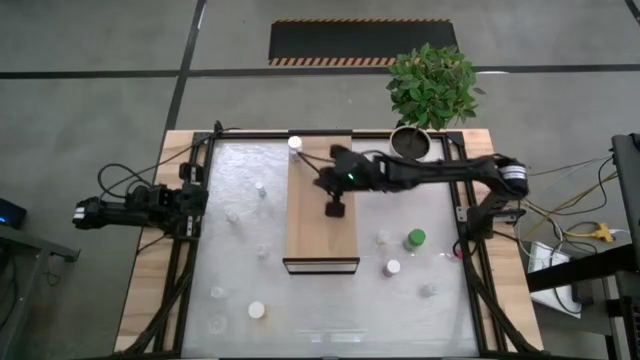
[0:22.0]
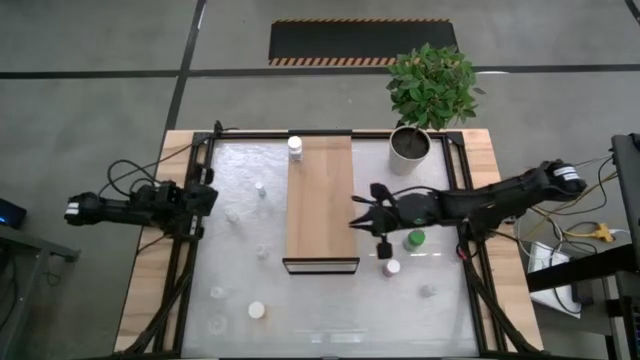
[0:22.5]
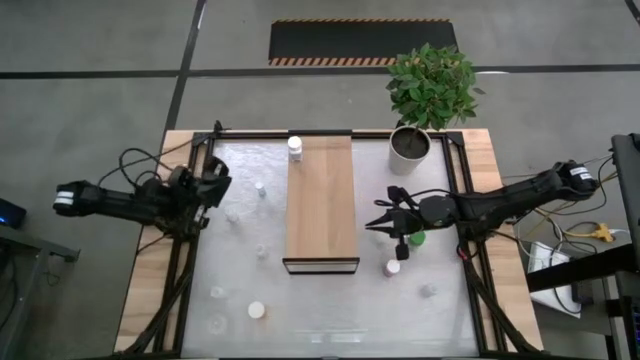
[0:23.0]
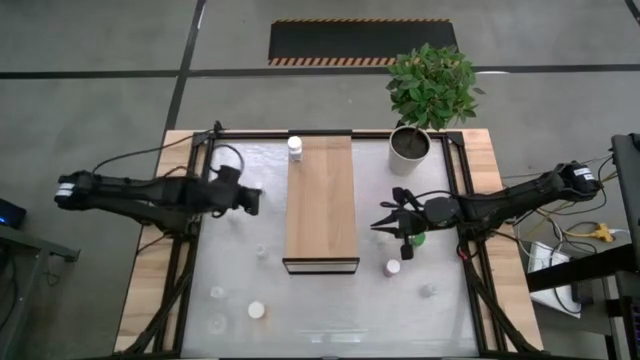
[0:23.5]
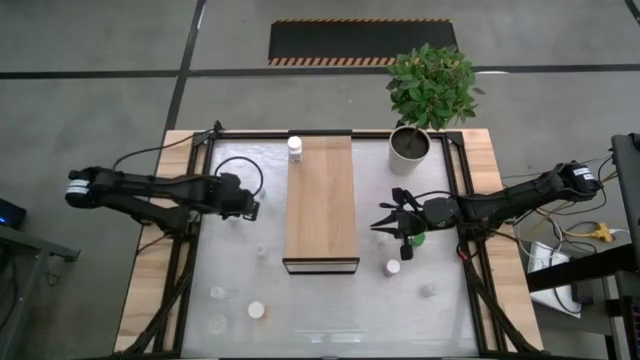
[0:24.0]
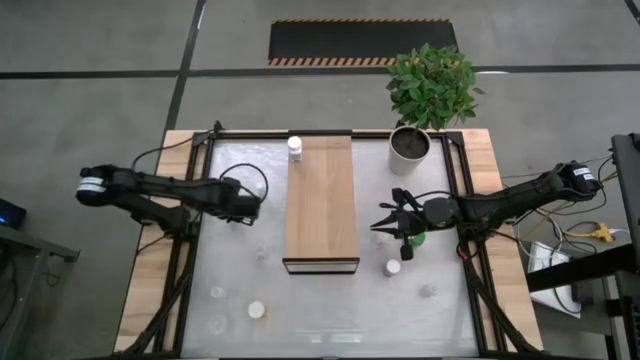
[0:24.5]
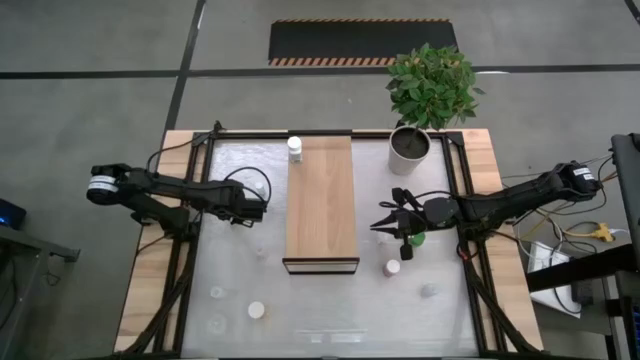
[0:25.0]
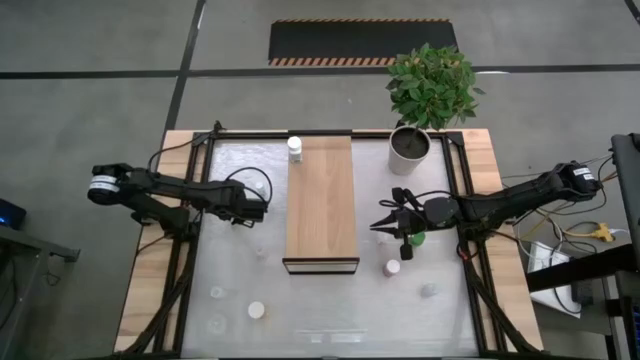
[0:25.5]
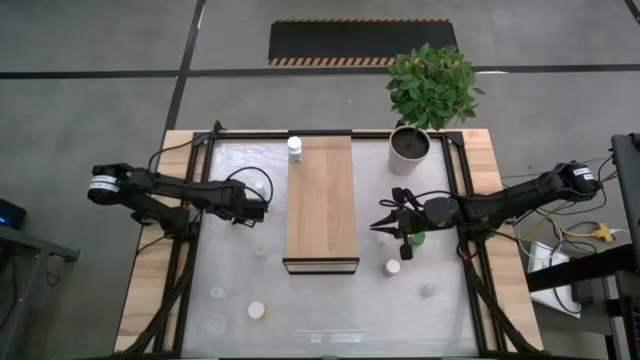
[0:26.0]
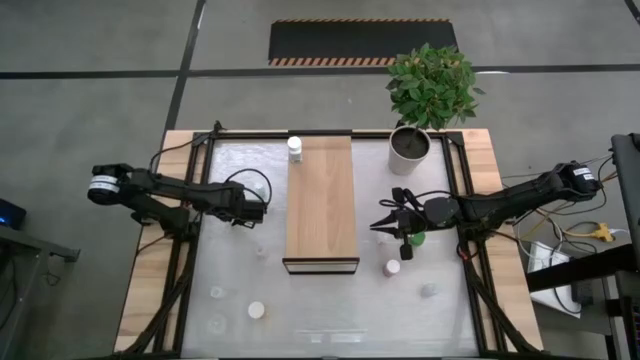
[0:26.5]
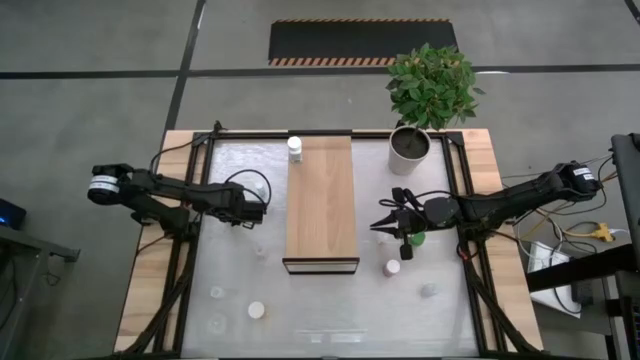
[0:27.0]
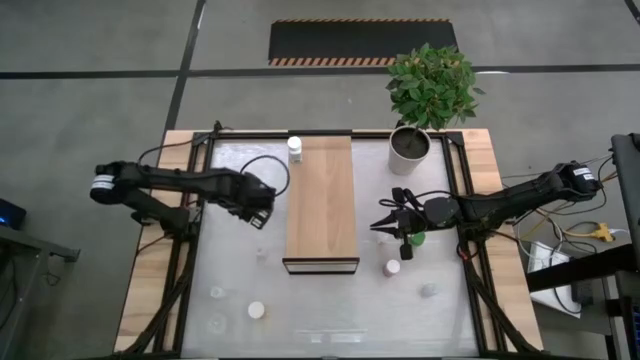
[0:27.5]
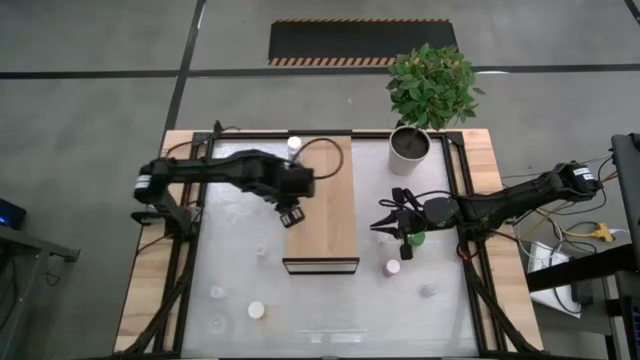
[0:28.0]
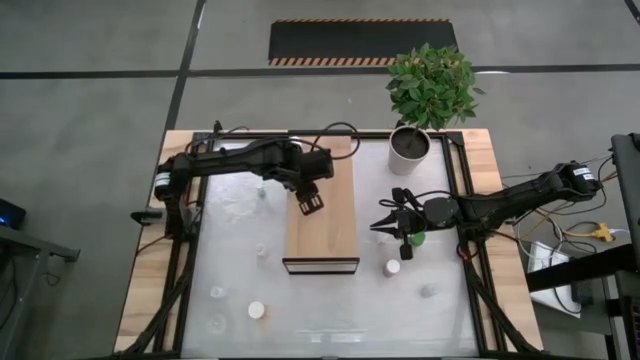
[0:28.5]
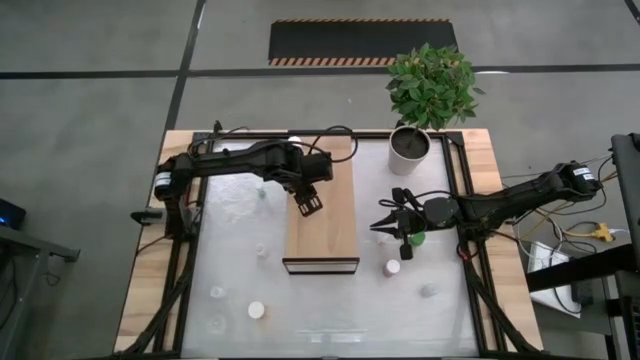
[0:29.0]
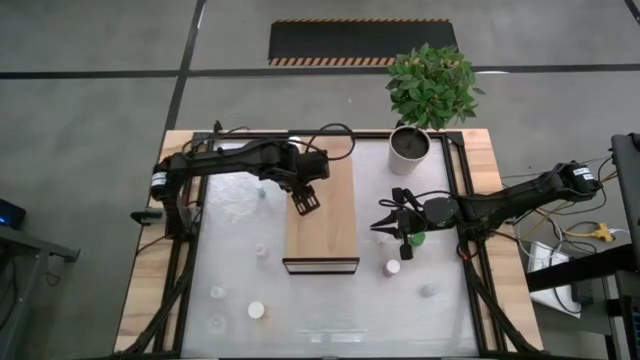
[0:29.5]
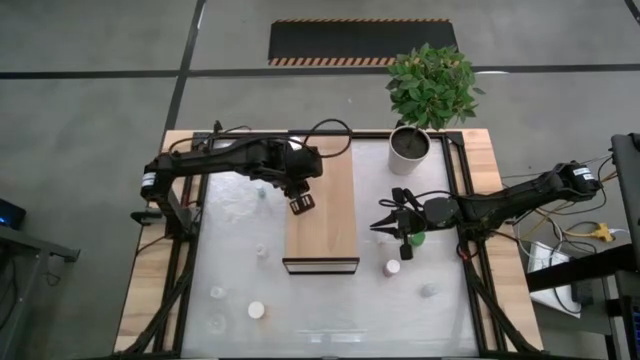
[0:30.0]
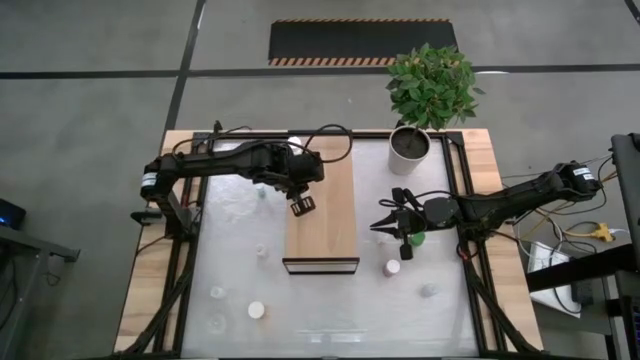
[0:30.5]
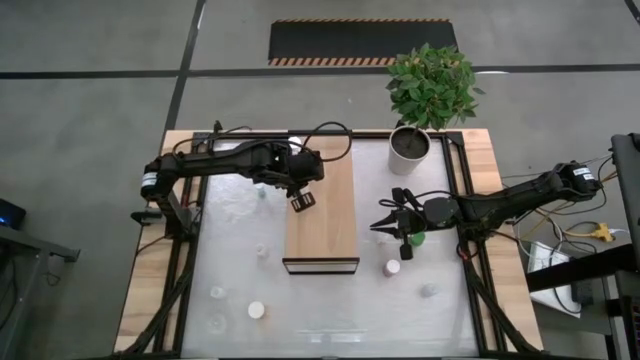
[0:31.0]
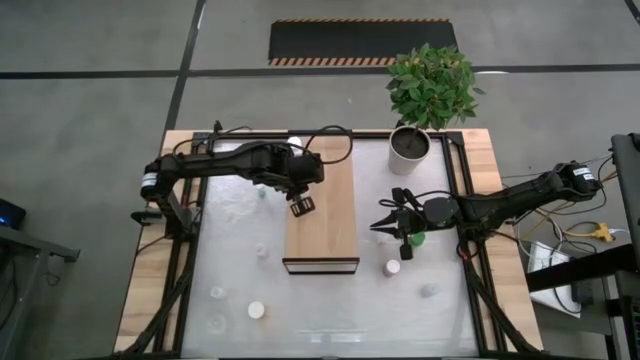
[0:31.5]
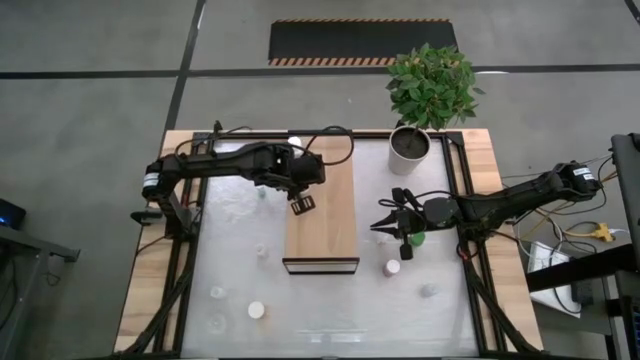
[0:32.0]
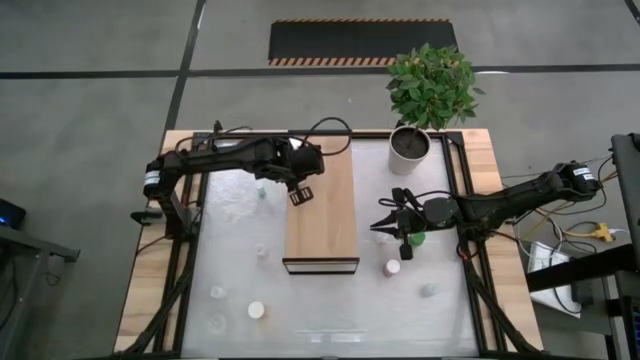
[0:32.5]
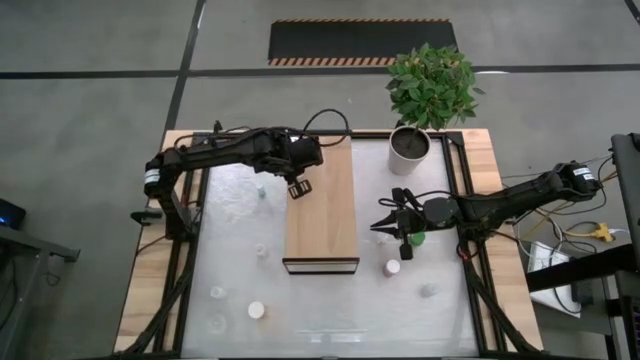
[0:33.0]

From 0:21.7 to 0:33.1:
Task: Pick and place medicine bottles onto shelf by color
Put the transparent pill bottle on the shelf

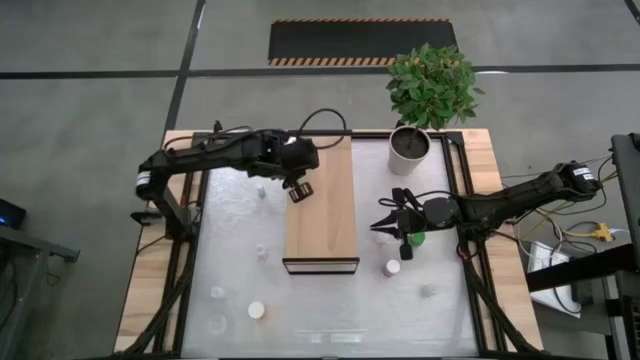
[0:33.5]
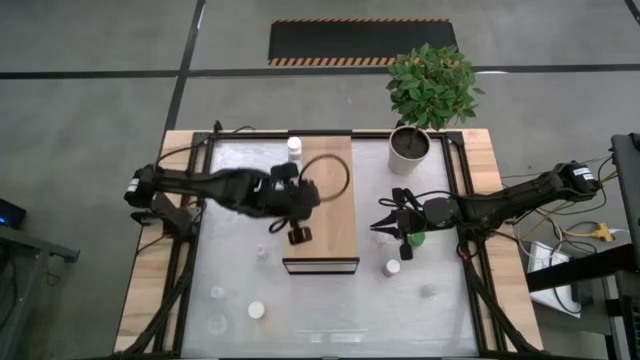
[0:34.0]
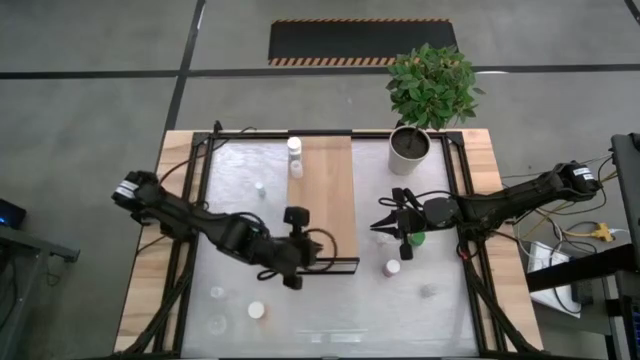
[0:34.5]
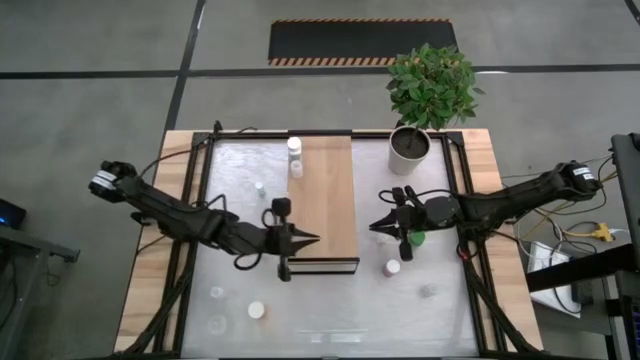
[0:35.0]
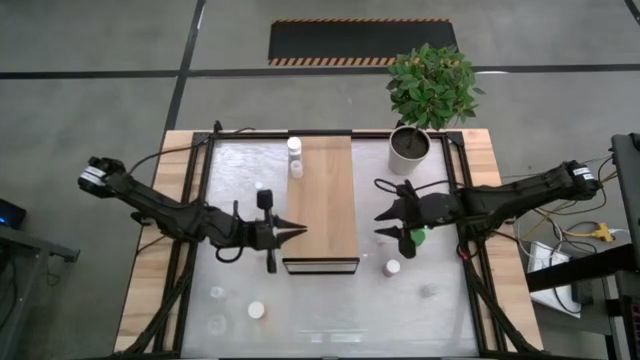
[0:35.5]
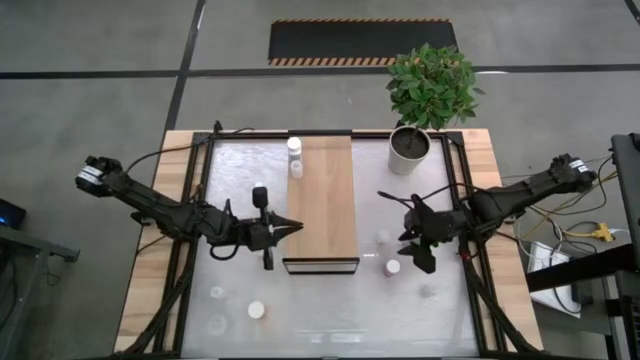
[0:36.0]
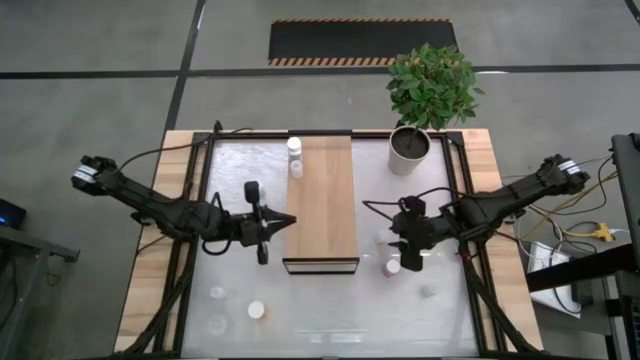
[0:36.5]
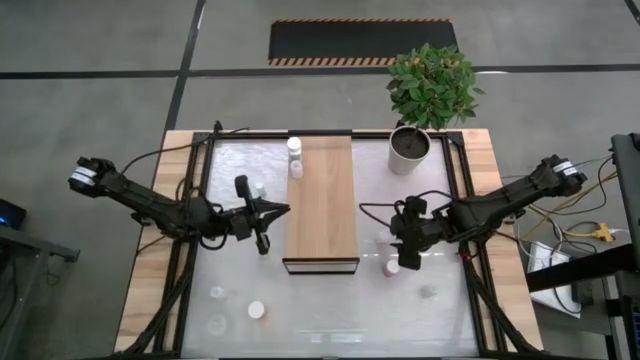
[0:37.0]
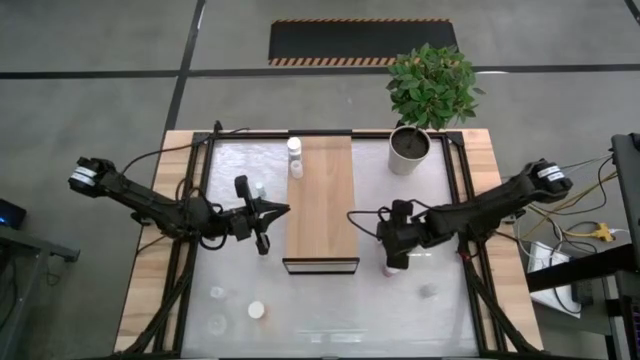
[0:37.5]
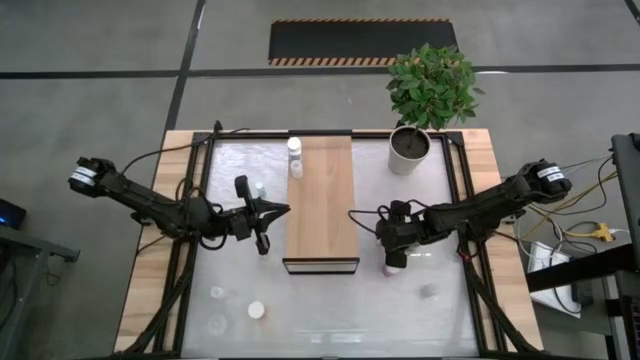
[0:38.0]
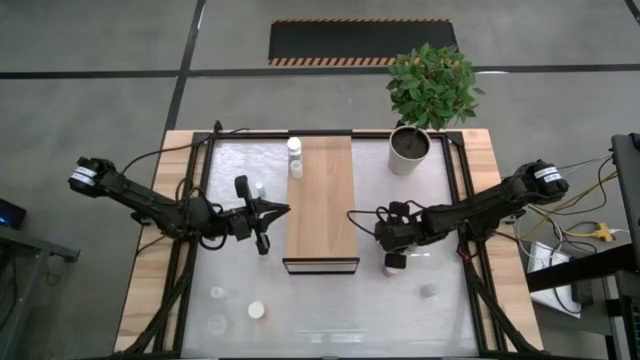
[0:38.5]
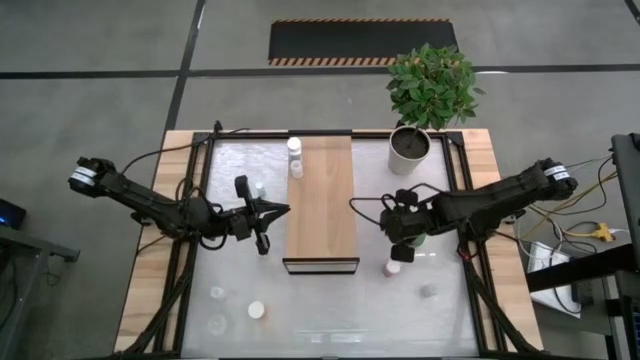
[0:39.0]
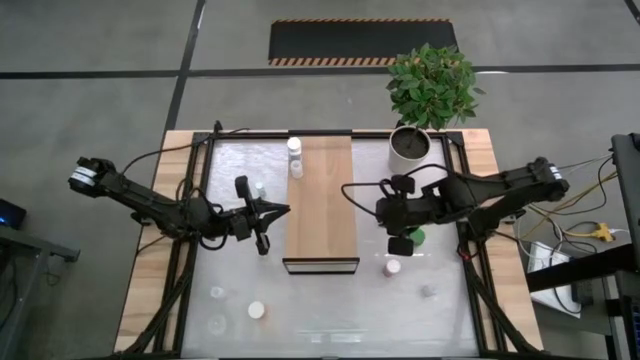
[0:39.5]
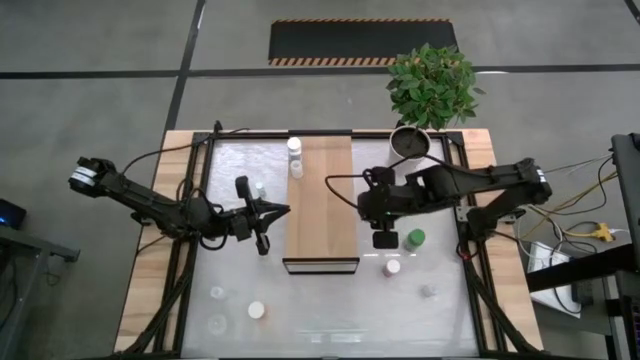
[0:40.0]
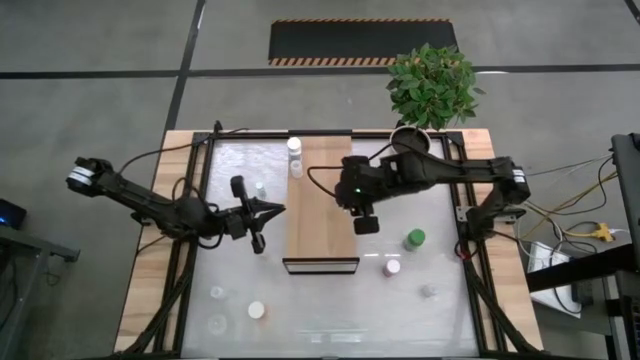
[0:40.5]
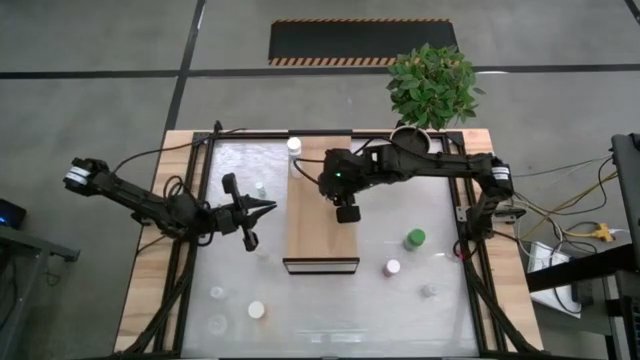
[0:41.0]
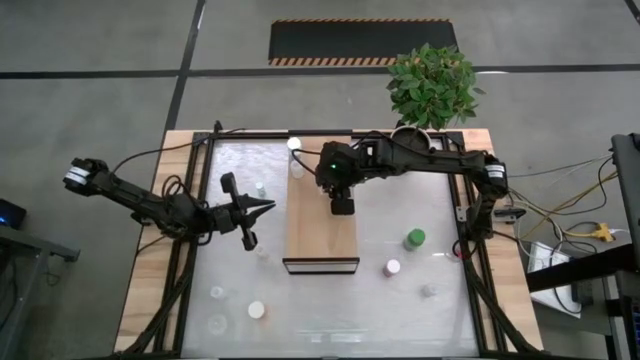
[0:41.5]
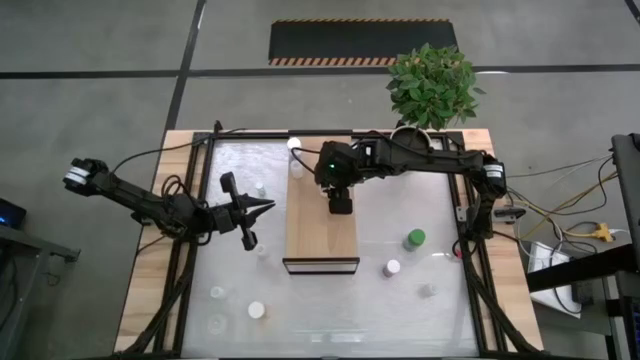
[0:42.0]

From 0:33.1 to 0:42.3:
Put the transparent pill bottle on the shelf

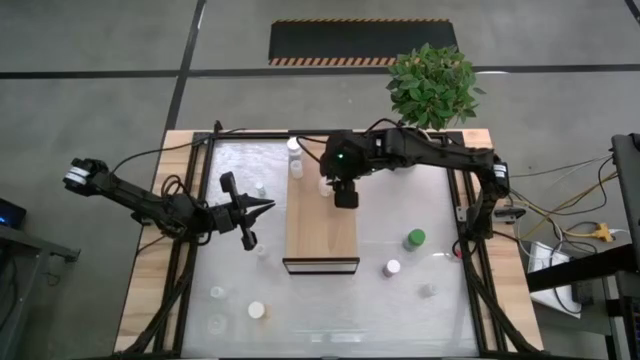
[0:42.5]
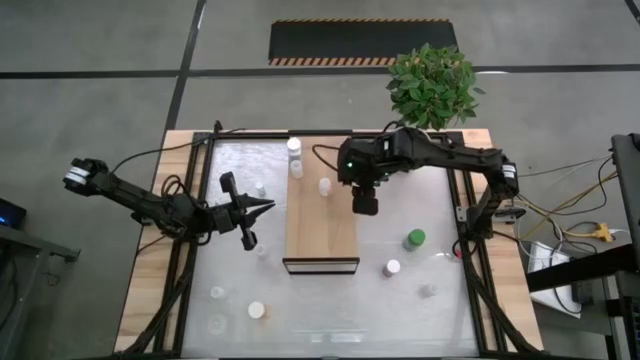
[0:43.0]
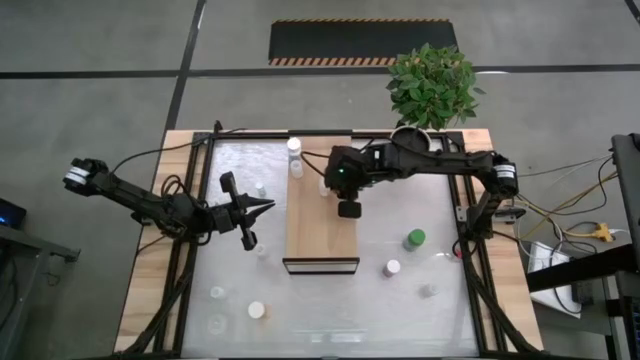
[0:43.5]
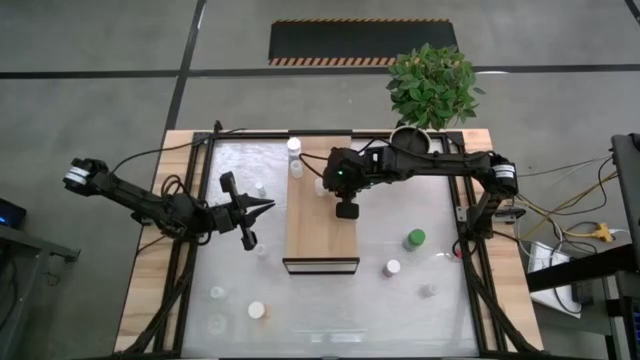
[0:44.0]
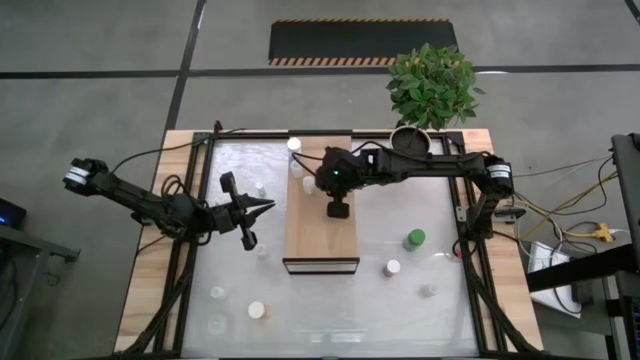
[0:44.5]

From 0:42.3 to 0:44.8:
Put the transparent pill bottle on the shelf
